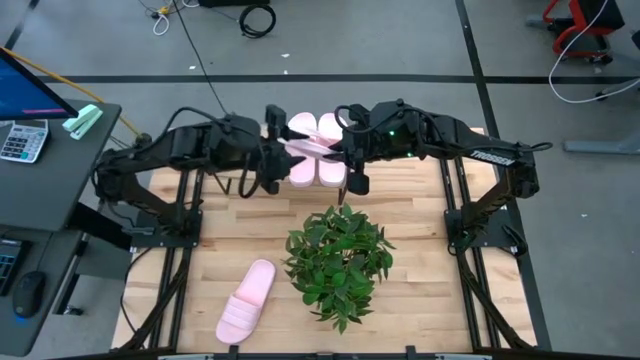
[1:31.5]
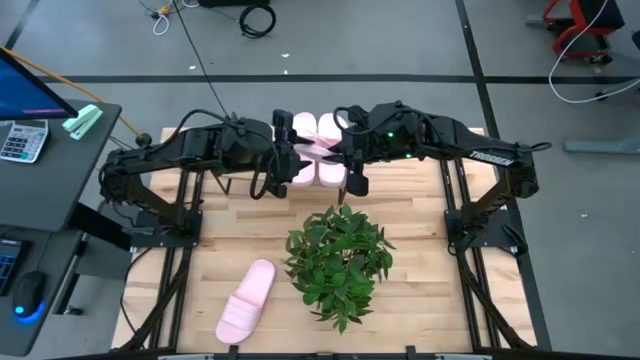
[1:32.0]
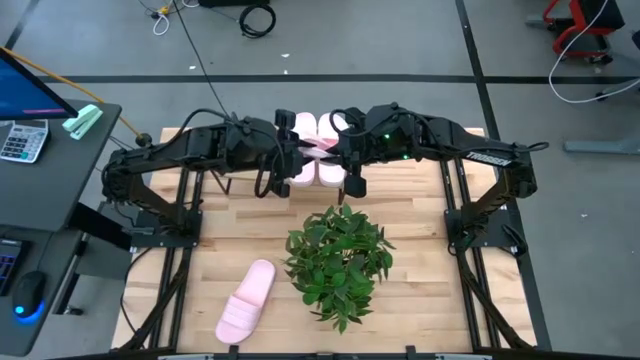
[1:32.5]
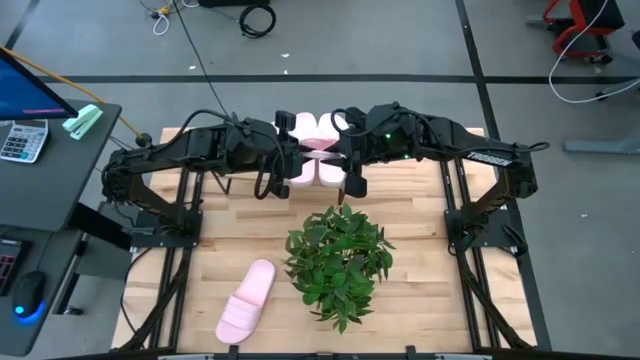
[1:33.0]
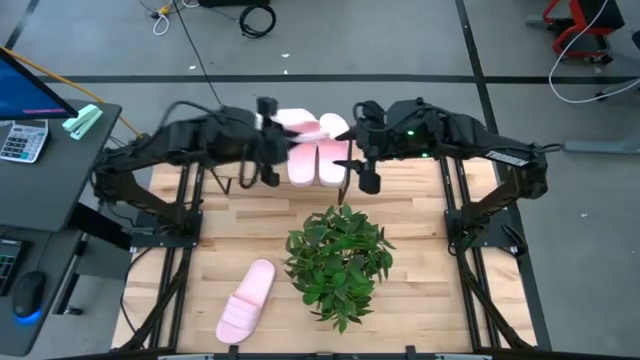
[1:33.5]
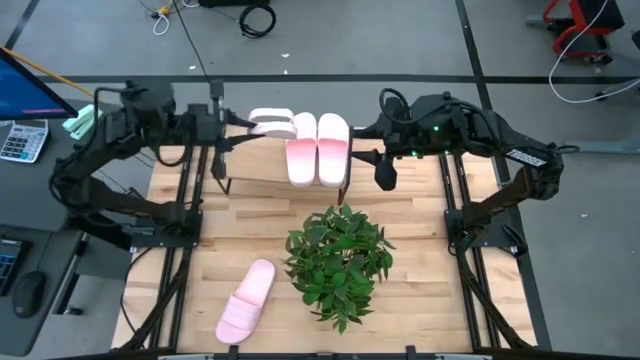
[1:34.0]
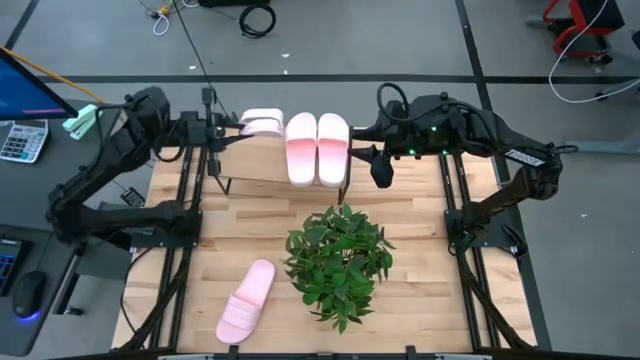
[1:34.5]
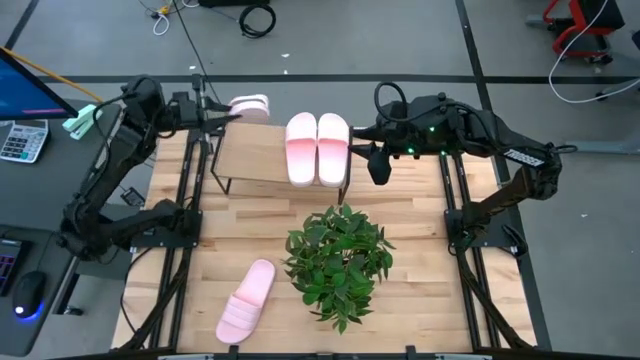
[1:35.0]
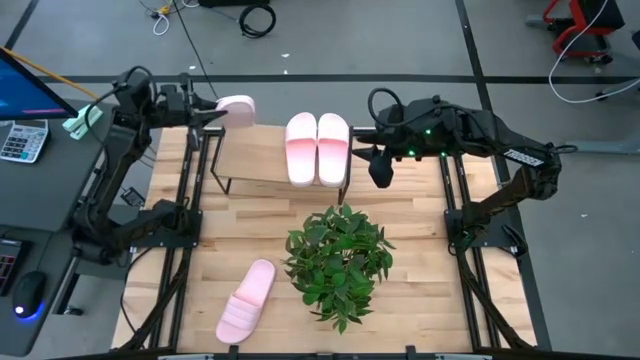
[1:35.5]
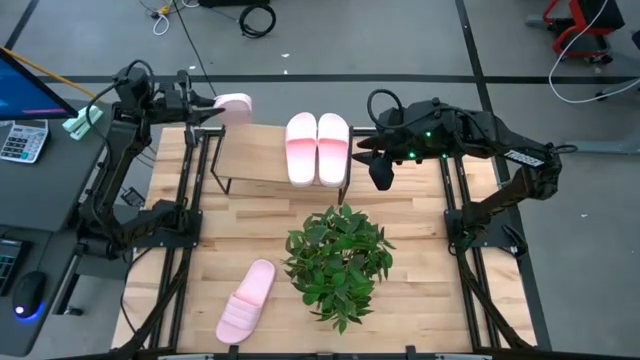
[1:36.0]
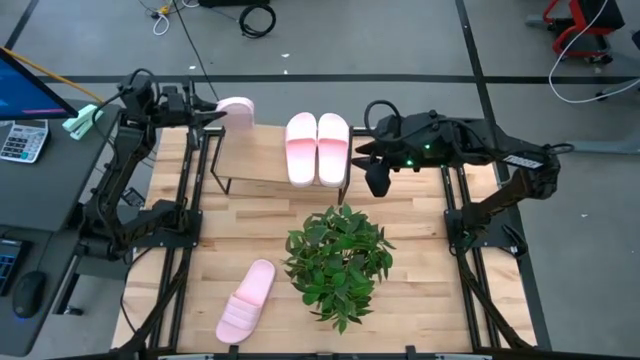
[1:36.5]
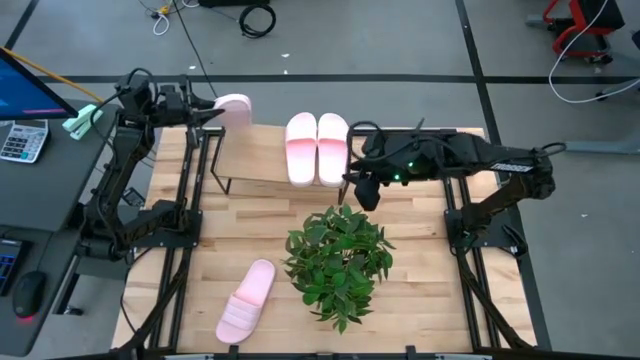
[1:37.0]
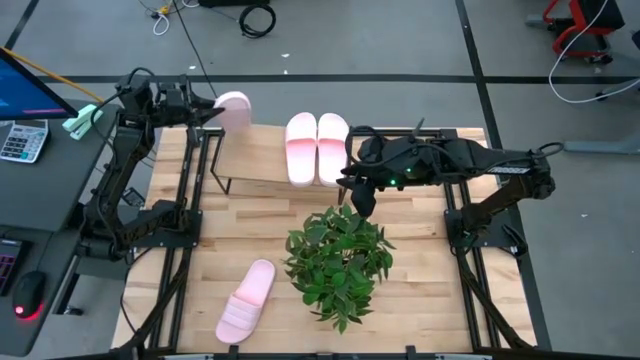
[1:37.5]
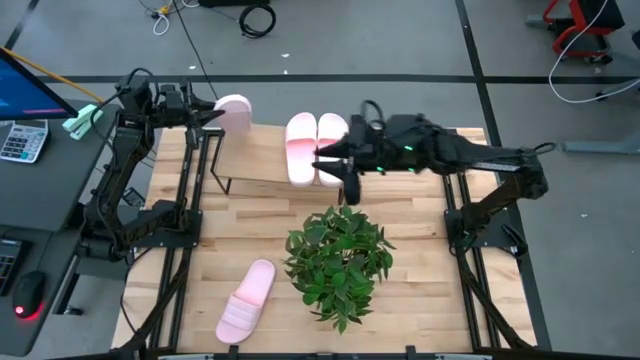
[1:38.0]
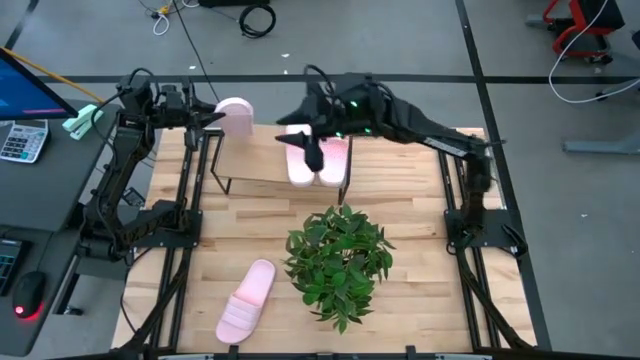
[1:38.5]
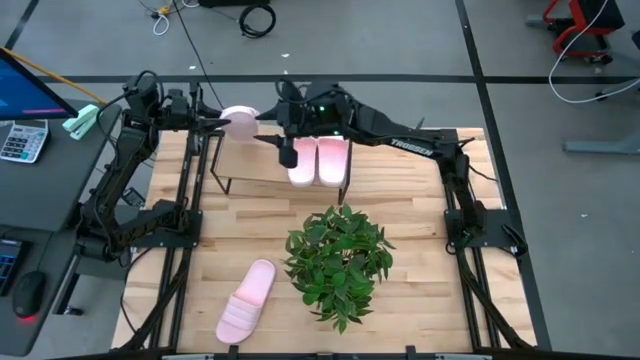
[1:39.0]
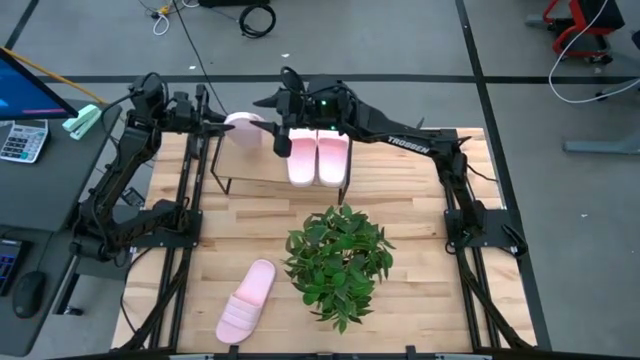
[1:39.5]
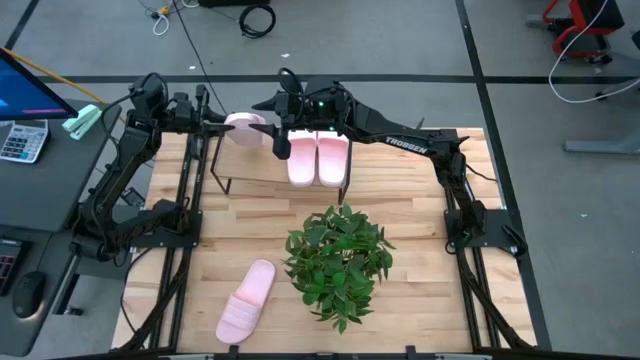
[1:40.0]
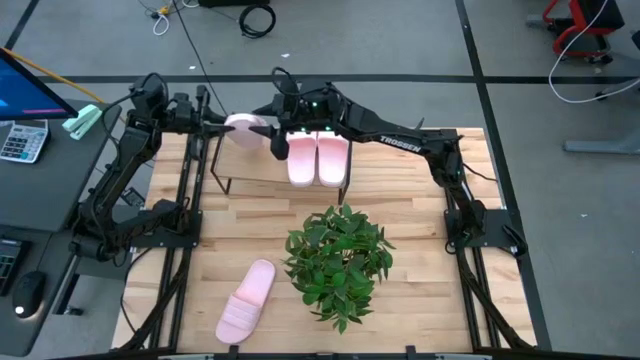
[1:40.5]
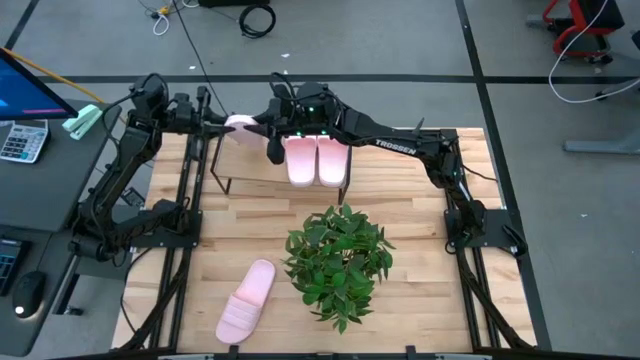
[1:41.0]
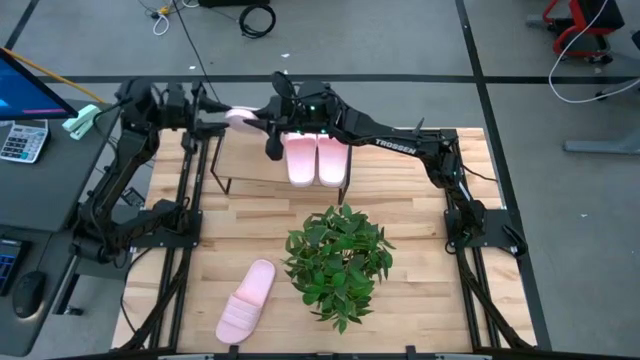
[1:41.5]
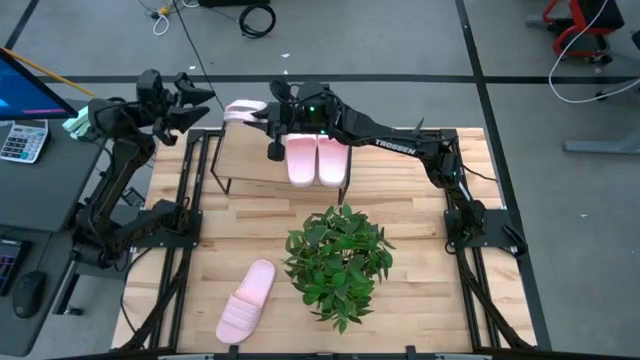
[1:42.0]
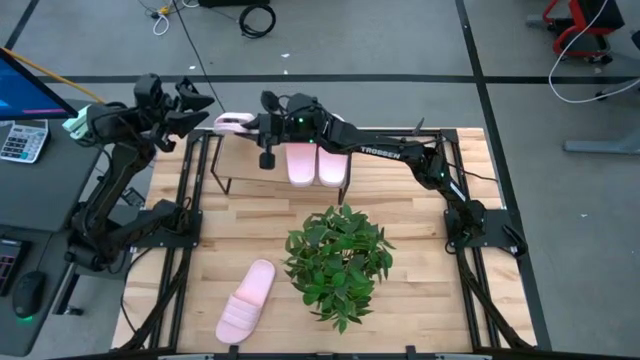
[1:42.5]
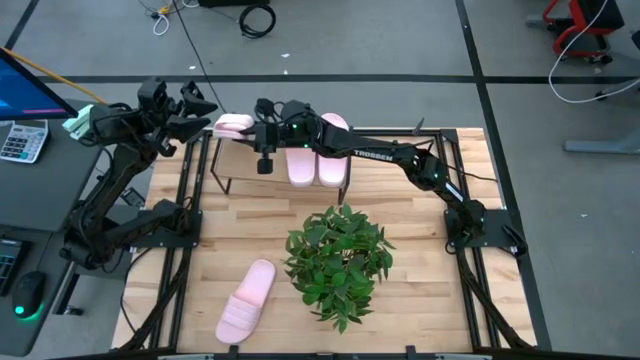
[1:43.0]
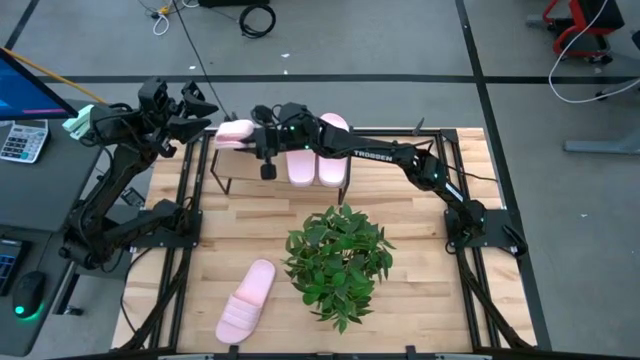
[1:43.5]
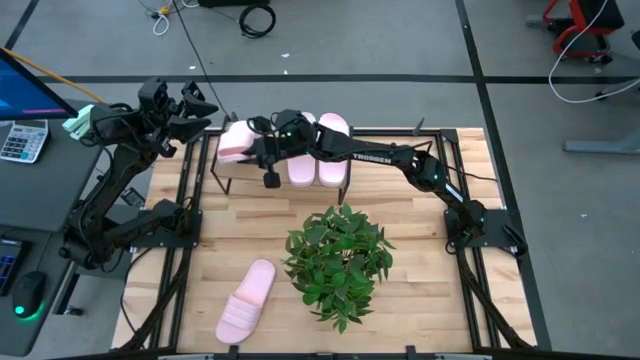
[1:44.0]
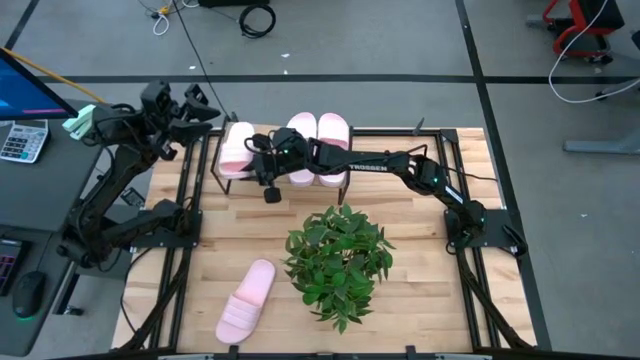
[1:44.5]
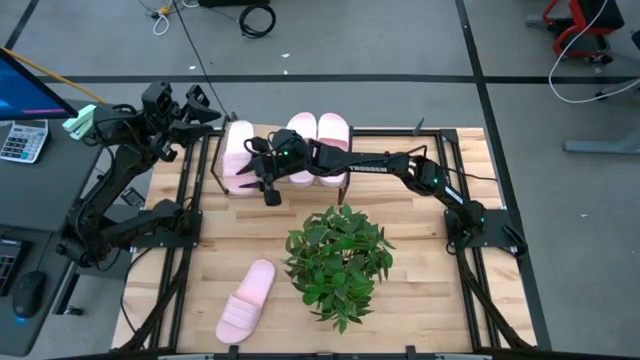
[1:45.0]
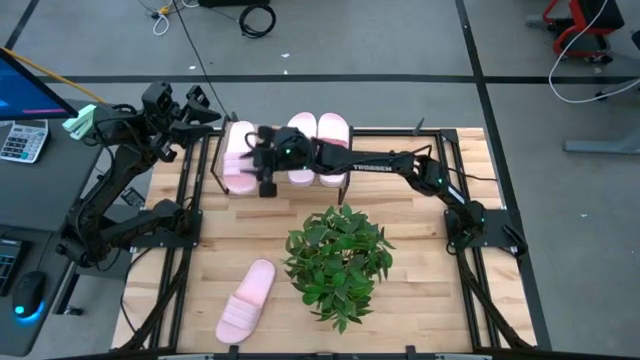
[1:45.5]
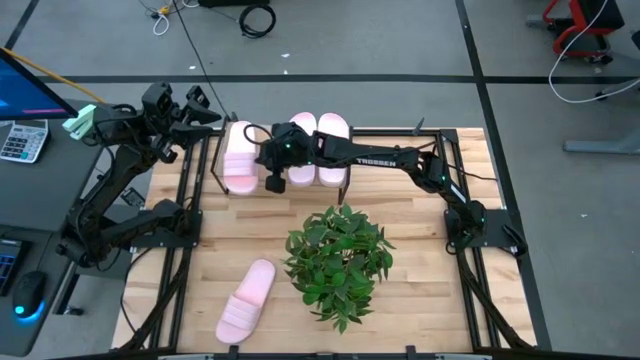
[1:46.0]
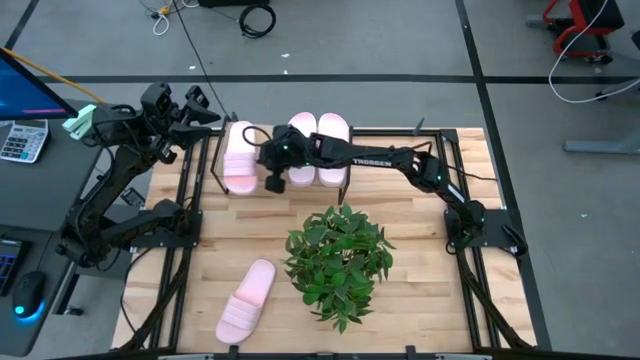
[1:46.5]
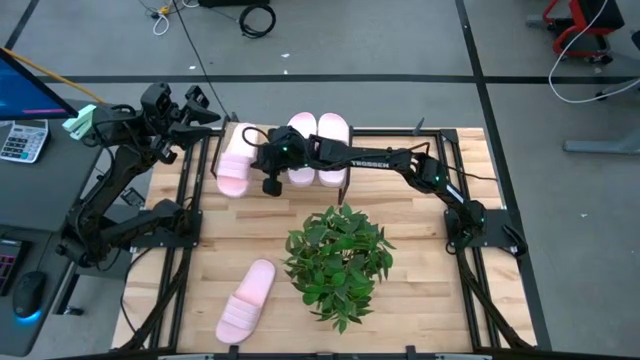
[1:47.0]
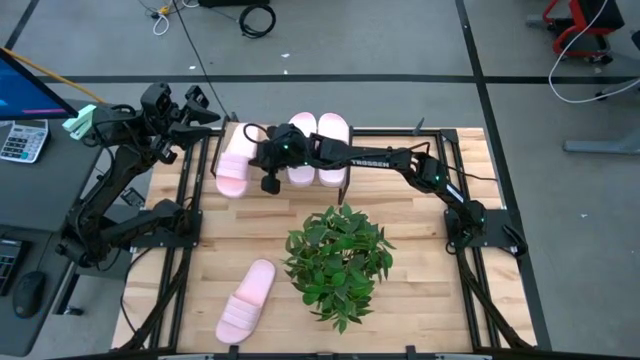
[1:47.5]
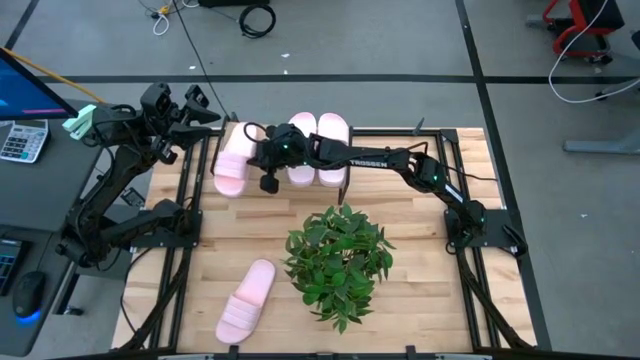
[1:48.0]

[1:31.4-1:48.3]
Task: Pick and place slides into the shelf
Put the pink slide on the shelf
